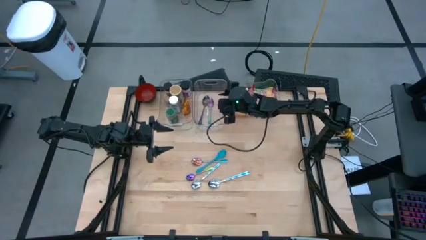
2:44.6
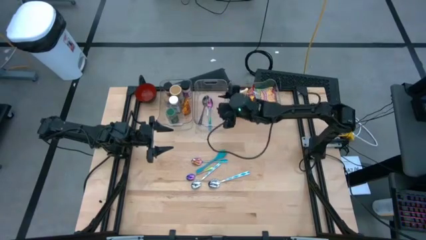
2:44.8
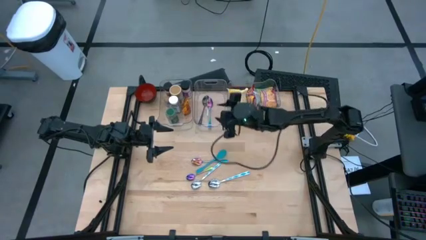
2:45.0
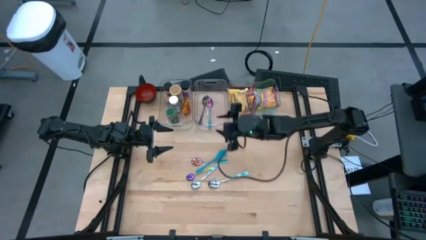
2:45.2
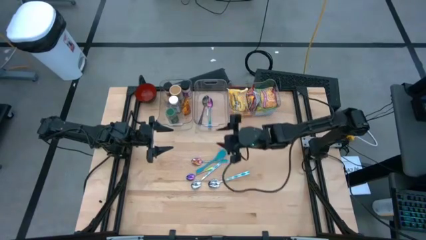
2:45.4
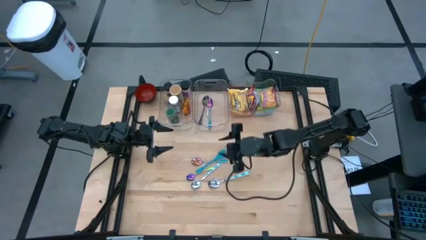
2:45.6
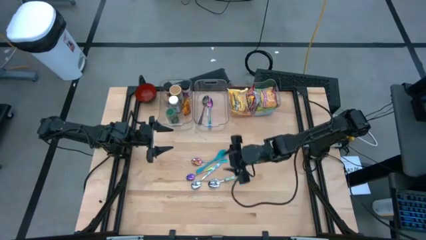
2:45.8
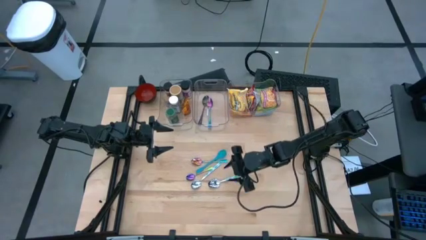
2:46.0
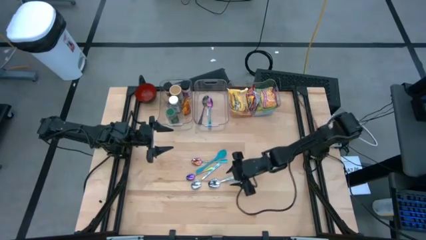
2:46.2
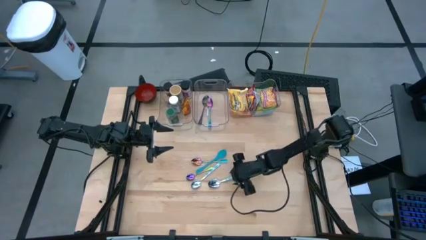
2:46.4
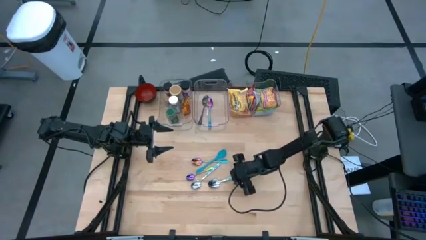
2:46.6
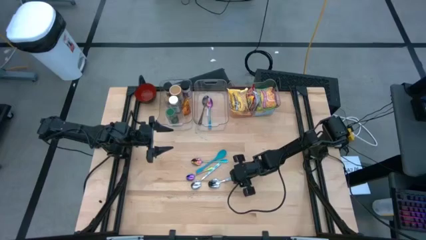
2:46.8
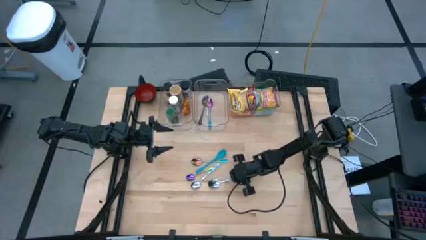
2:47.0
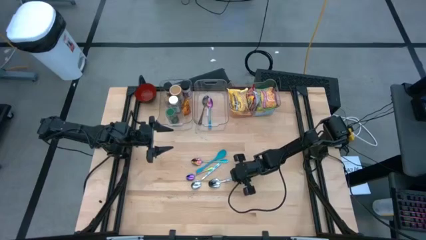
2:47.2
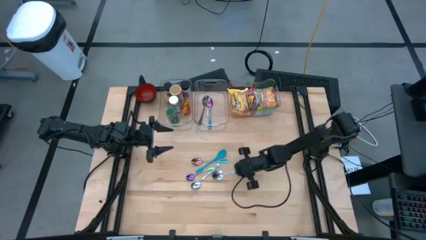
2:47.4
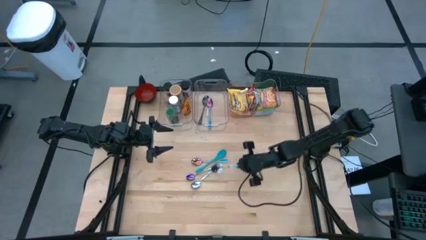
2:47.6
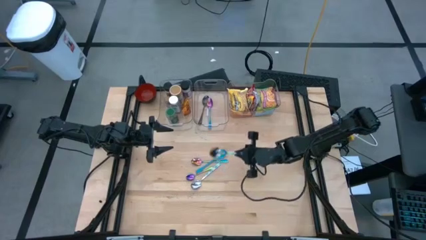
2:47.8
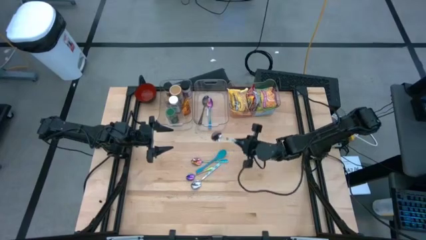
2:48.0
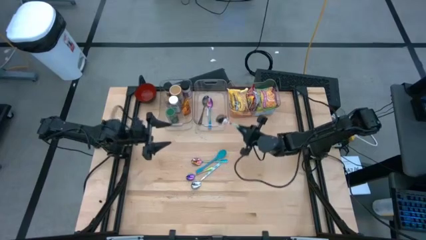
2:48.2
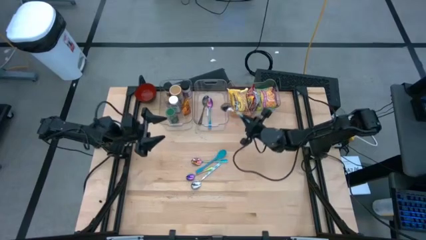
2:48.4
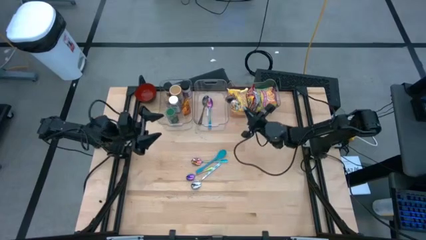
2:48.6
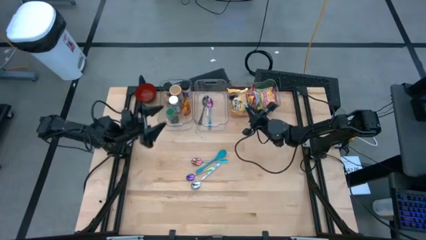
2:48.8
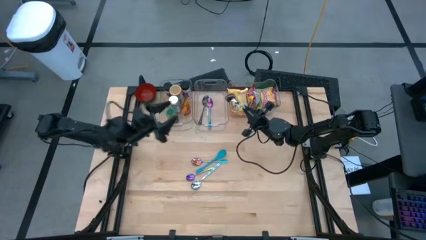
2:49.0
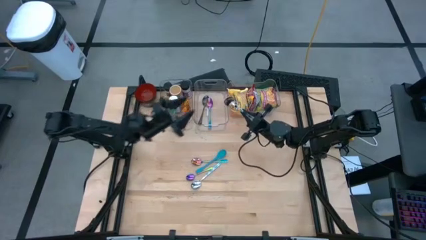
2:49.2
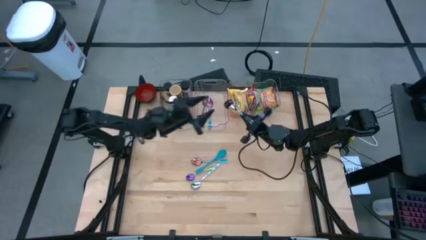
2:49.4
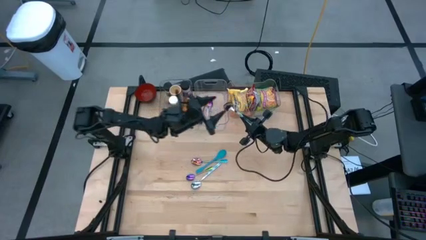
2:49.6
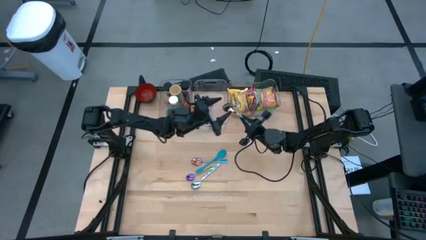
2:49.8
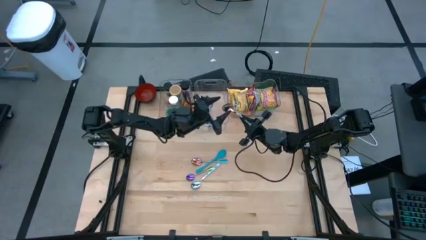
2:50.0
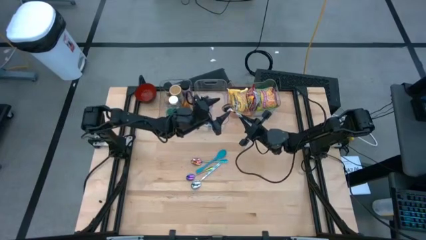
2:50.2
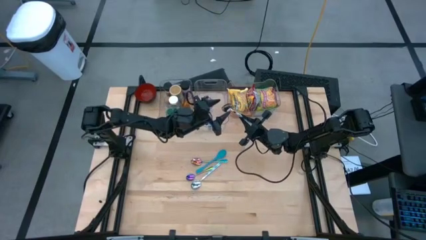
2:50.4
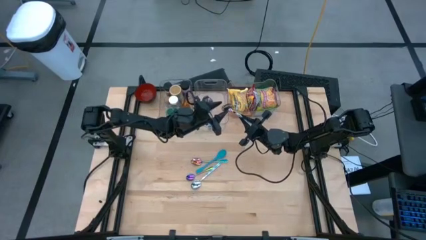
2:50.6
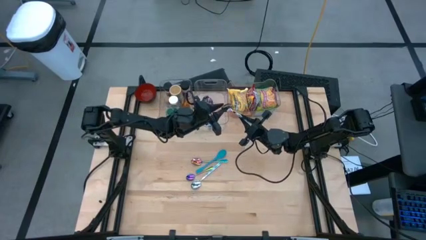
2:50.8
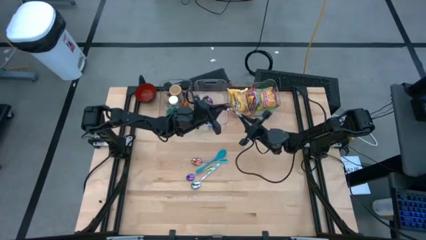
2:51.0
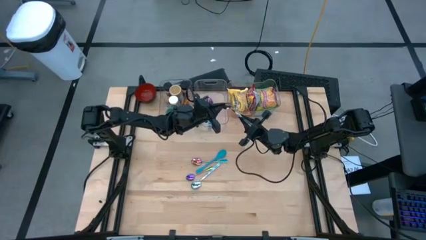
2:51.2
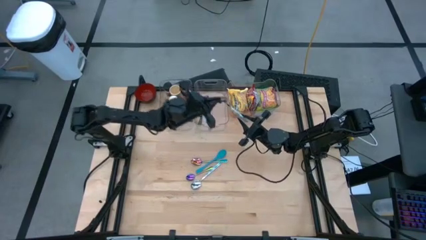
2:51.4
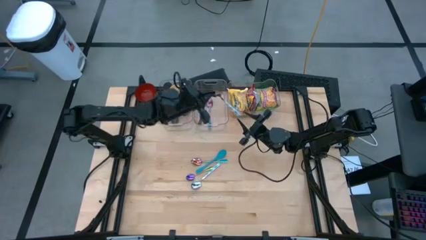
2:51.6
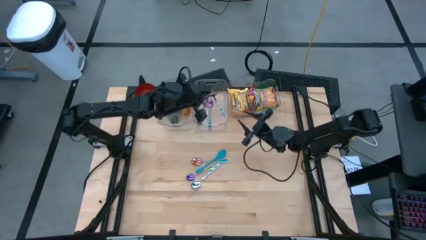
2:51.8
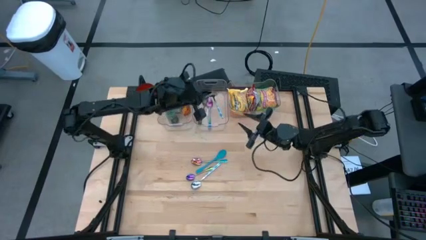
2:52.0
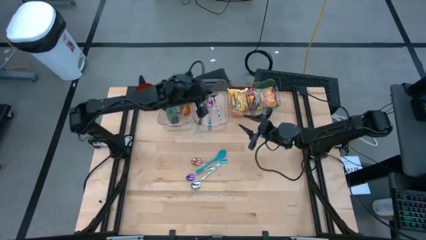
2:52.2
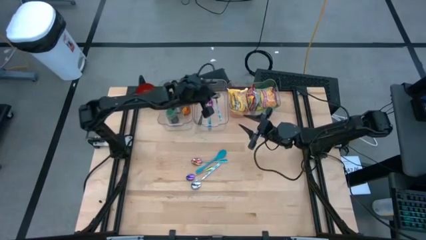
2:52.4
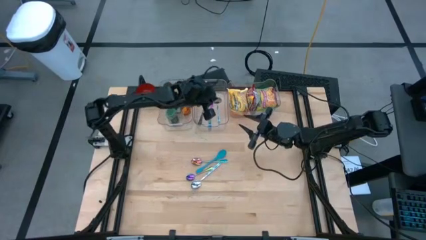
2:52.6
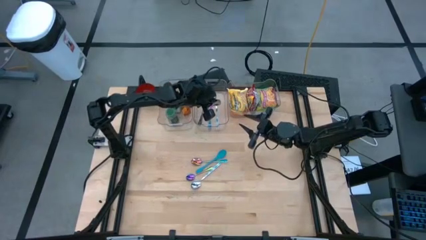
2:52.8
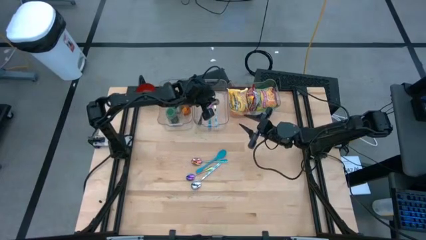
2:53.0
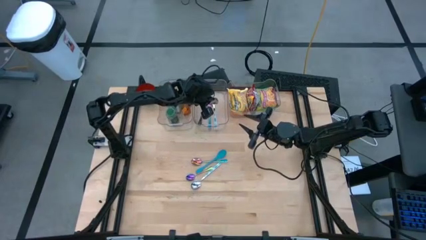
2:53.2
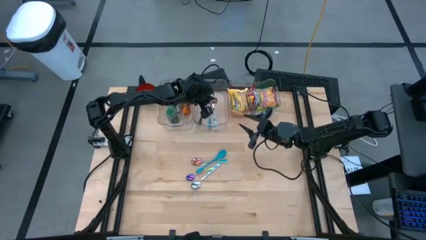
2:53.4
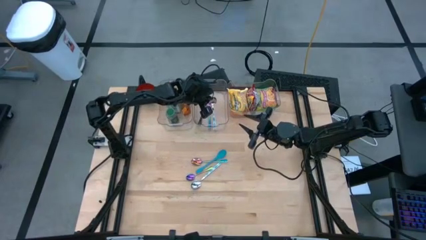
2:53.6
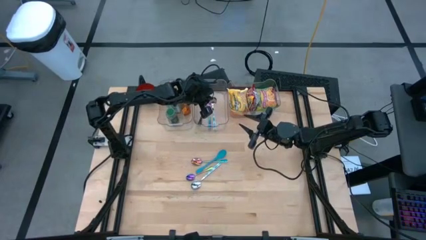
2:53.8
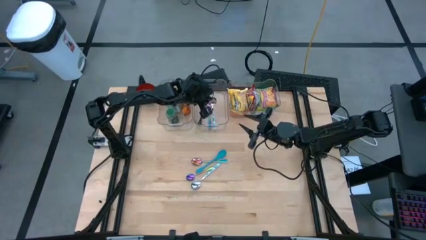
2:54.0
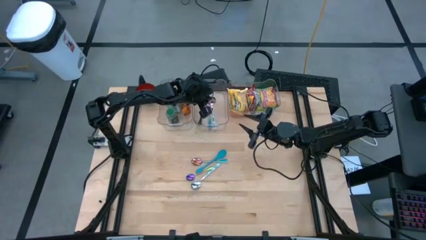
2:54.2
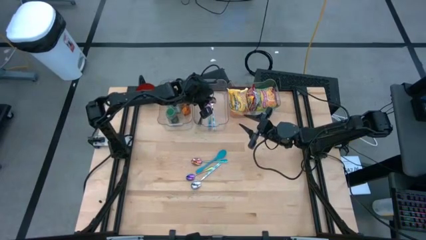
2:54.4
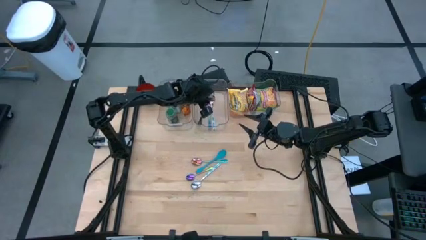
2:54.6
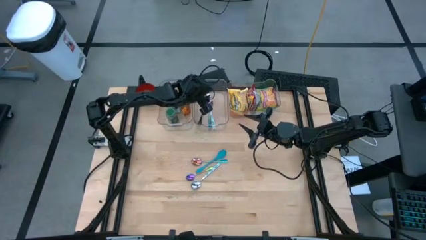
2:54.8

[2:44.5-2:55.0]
Task: Pick & Place Food Item
Put the right white and blue spoon into the middle transparent bin

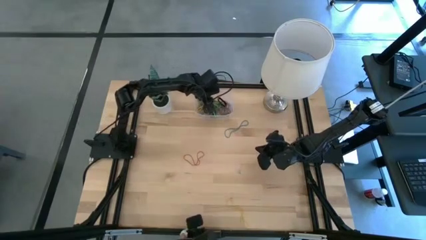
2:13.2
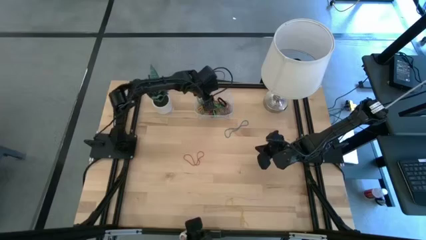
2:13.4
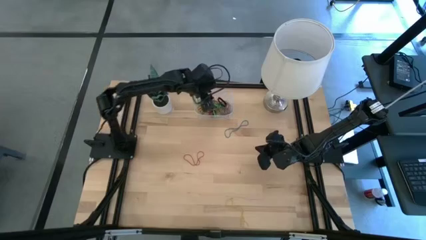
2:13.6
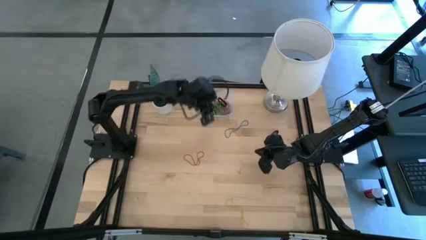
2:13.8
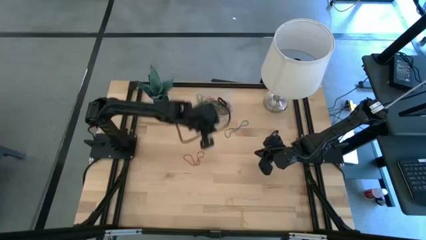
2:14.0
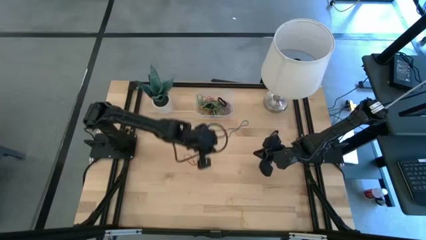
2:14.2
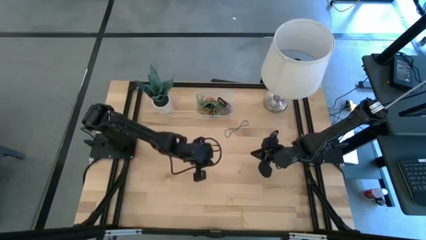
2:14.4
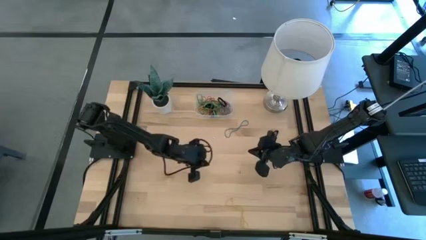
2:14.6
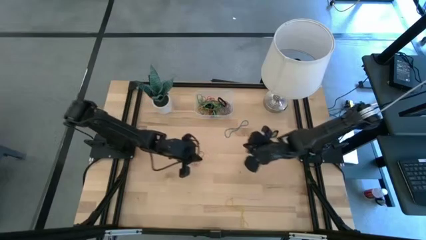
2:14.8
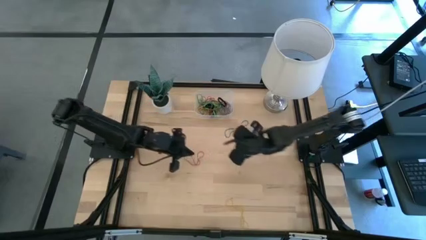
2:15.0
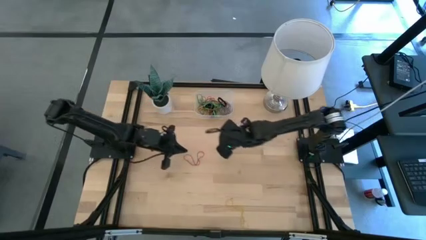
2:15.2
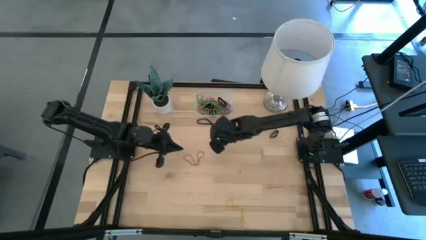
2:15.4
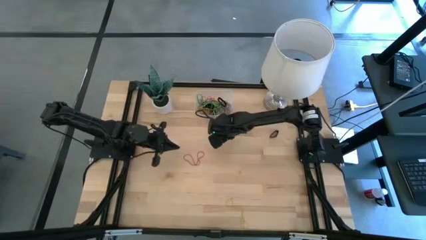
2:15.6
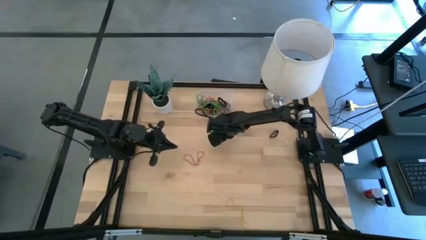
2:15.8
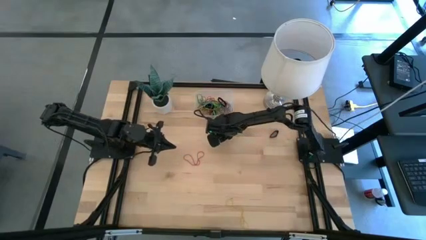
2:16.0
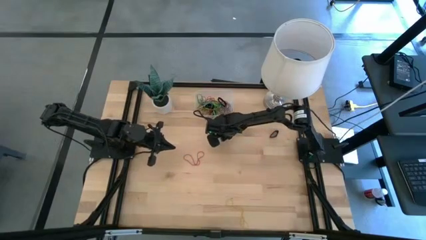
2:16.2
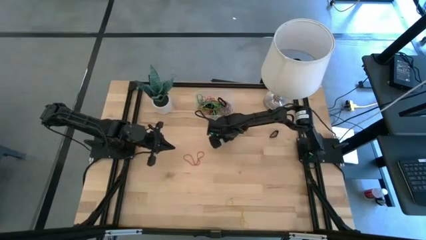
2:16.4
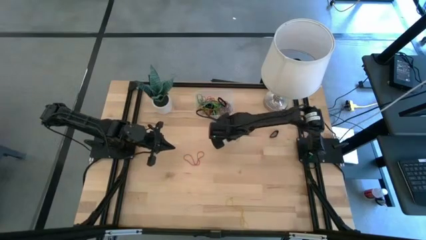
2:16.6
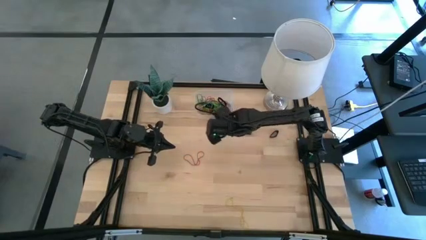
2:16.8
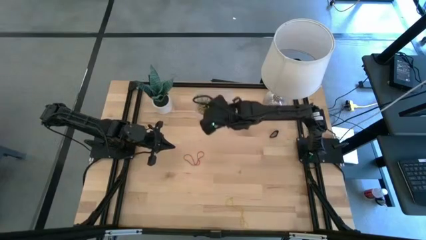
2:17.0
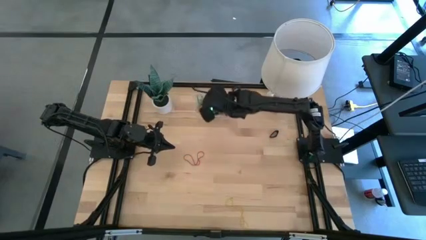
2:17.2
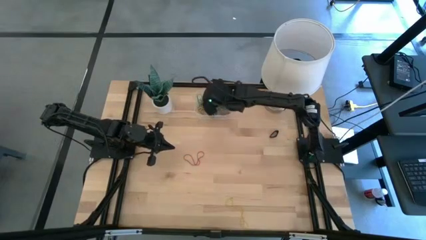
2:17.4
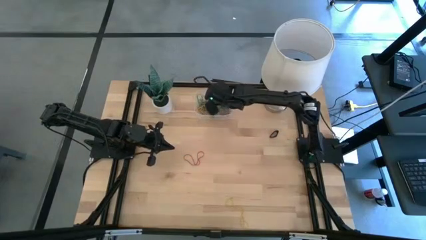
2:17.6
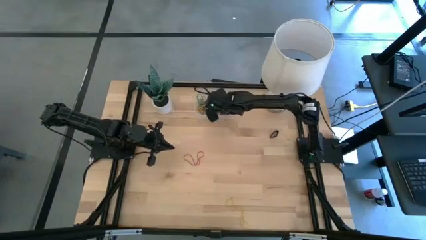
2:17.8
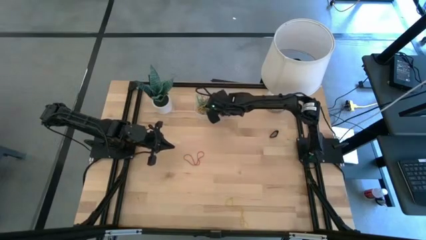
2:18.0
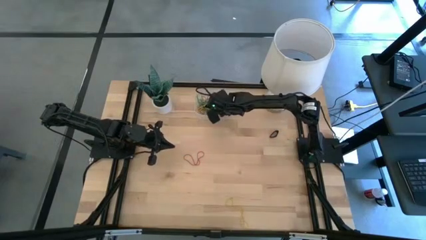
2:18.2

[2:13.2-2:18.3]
Task: Pick and place rubber bands into bin
Put the blue rubber band into the transparent bin

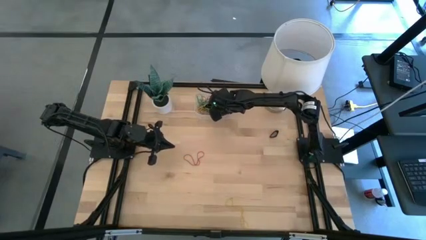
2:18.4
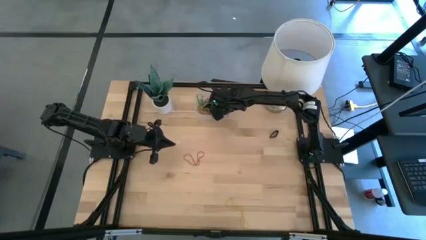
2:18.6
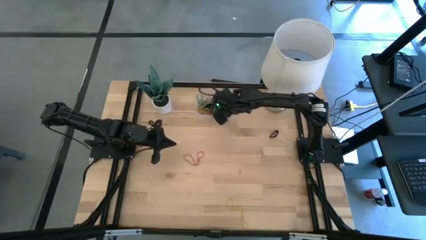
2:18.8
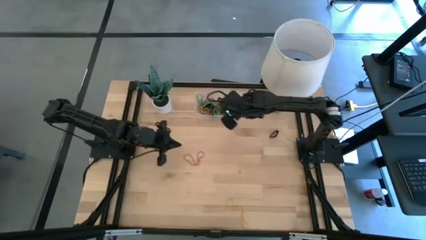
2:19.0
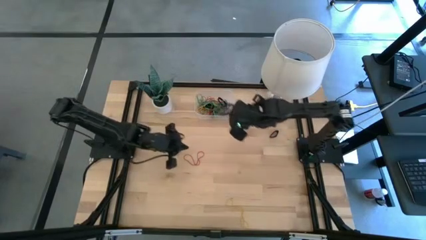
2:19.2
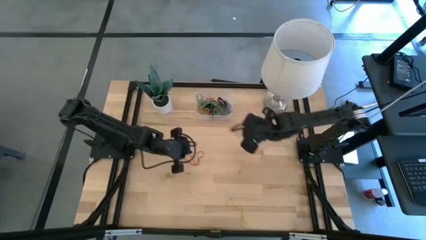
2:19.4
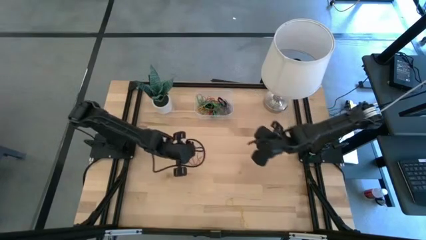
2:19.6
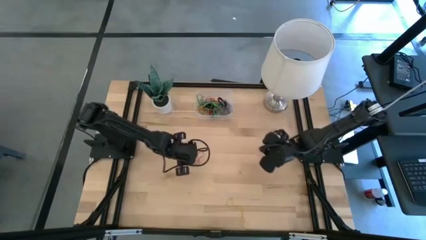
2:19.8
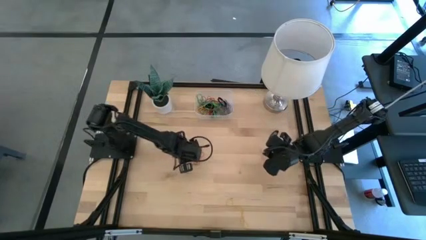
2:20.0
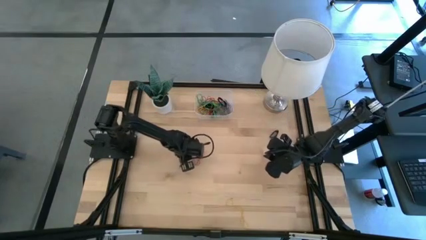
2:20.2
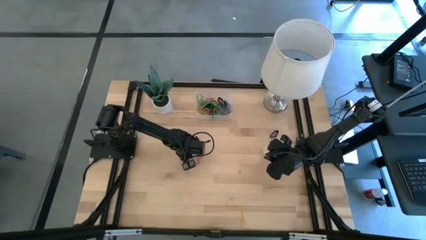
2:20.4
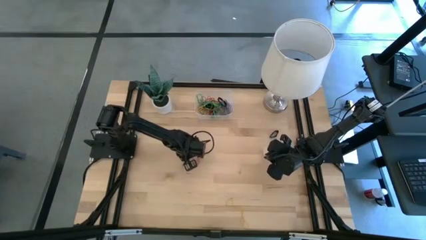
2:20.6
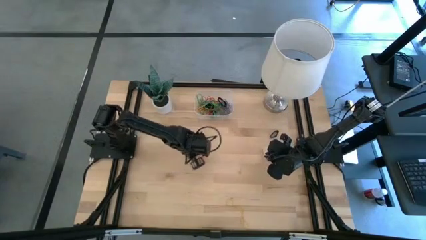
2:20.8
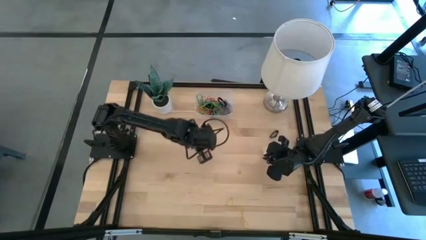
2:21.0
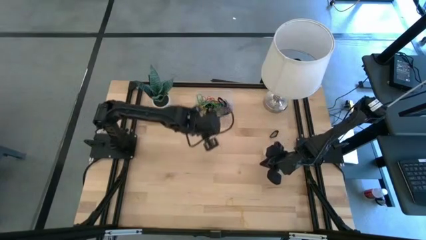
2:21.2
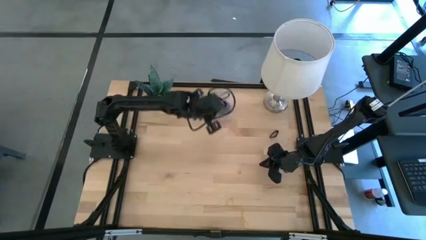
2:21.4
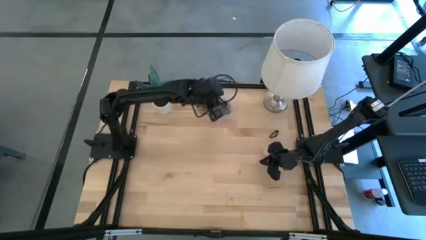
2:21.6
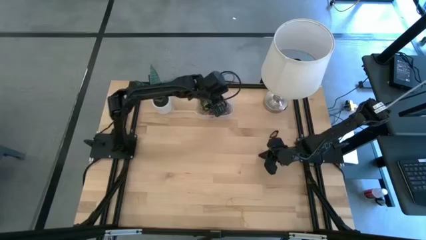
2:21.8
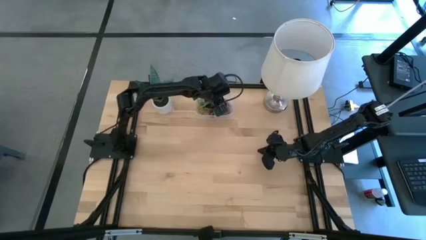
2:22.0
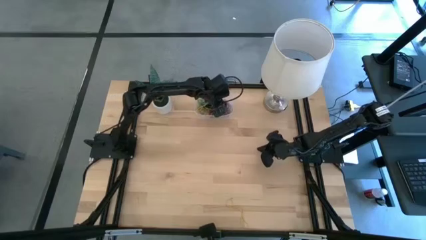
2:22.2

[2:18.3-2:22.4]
Put the red rubber band into the transparent bin
